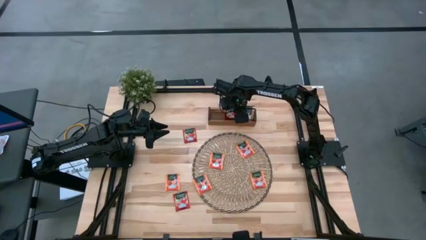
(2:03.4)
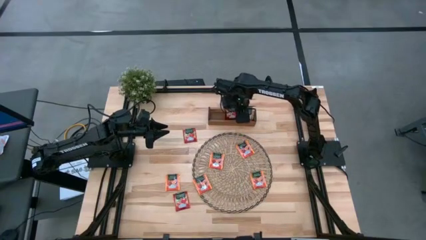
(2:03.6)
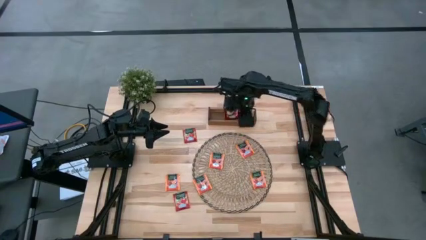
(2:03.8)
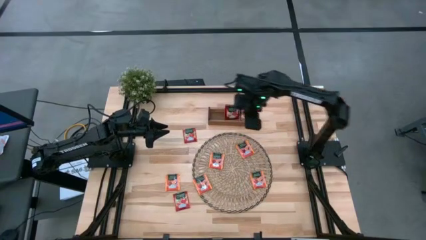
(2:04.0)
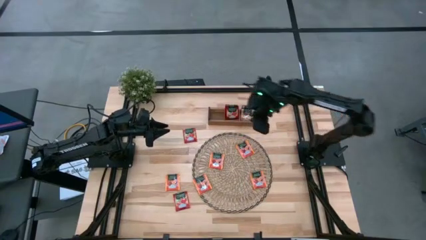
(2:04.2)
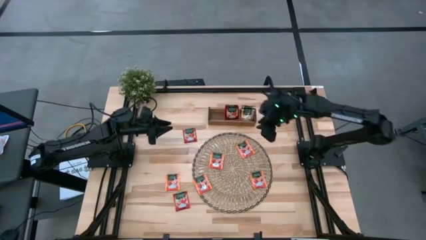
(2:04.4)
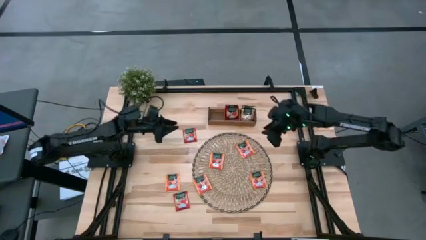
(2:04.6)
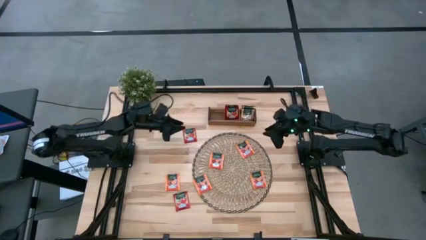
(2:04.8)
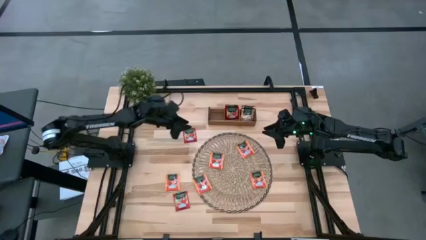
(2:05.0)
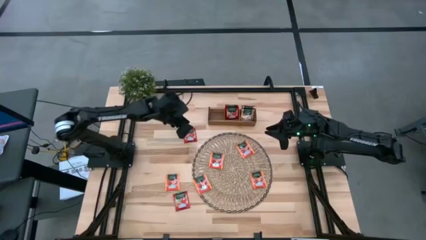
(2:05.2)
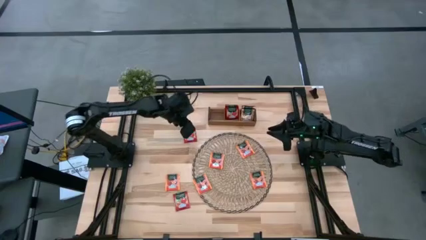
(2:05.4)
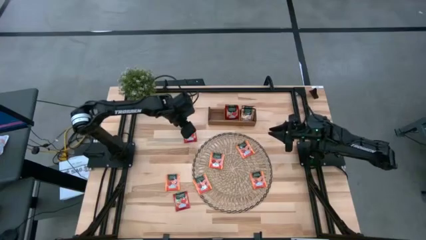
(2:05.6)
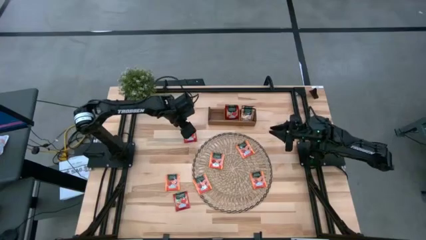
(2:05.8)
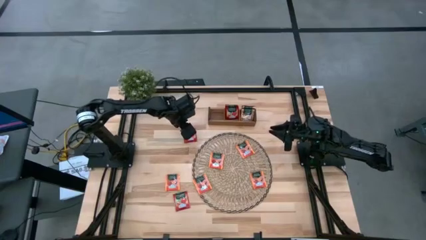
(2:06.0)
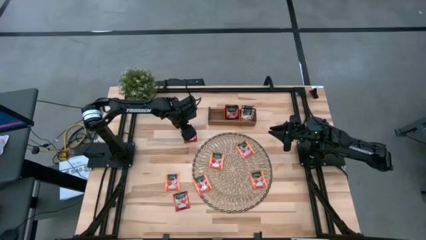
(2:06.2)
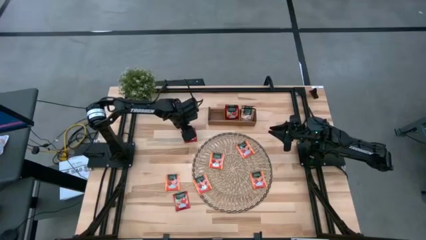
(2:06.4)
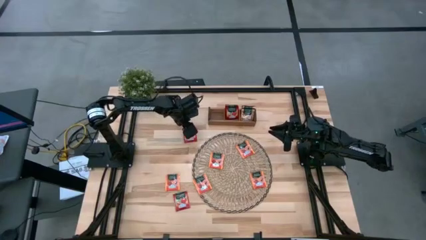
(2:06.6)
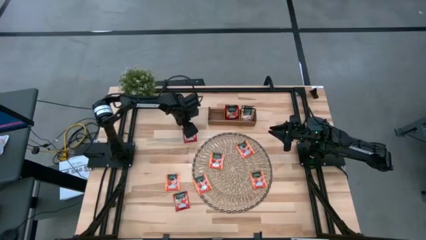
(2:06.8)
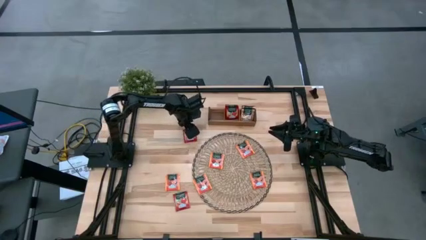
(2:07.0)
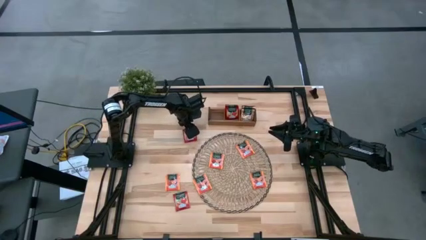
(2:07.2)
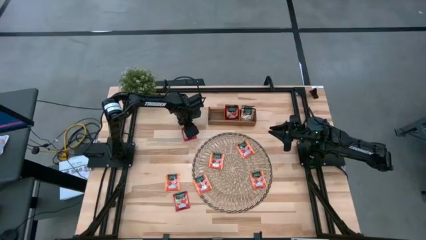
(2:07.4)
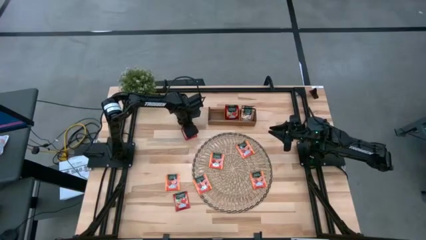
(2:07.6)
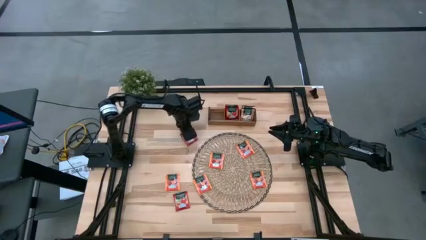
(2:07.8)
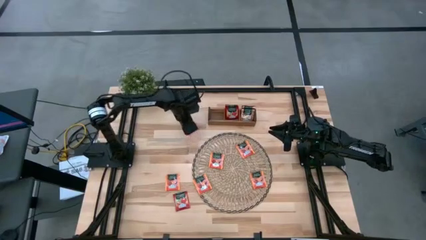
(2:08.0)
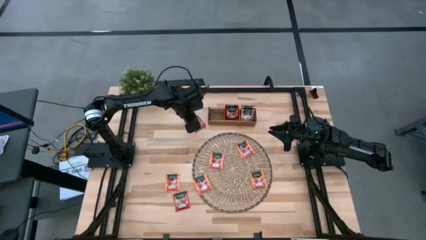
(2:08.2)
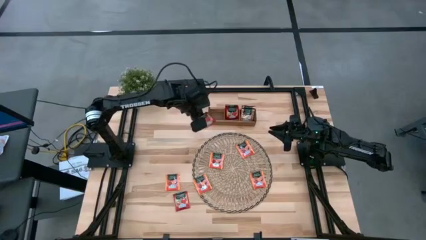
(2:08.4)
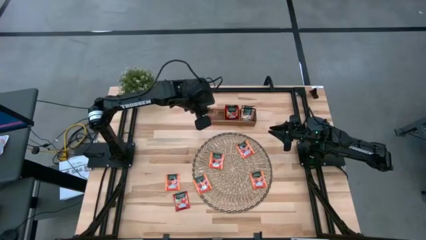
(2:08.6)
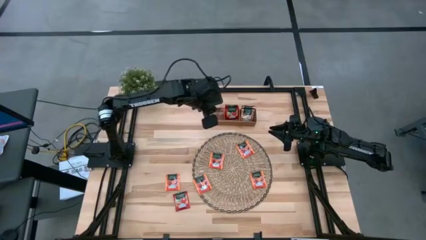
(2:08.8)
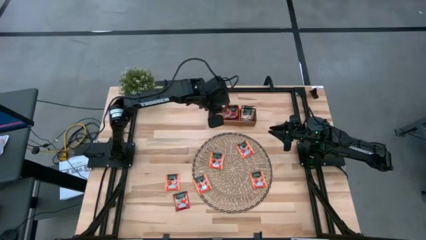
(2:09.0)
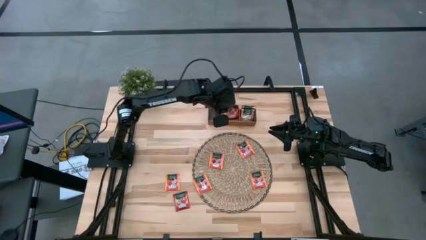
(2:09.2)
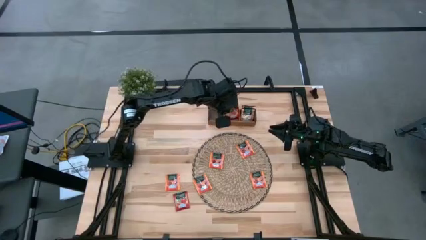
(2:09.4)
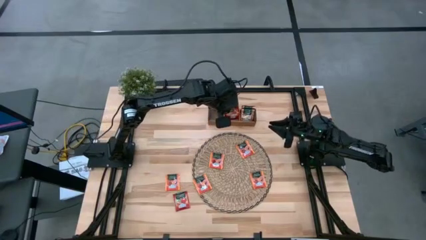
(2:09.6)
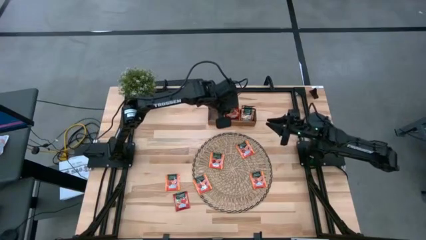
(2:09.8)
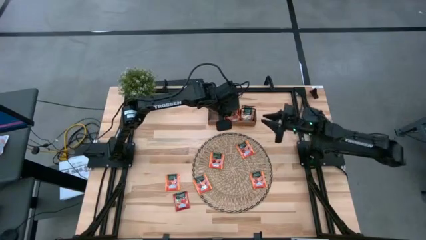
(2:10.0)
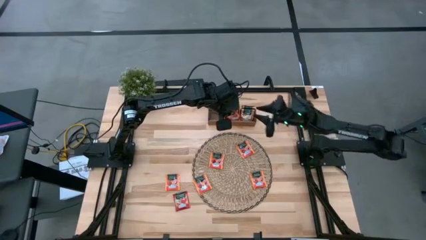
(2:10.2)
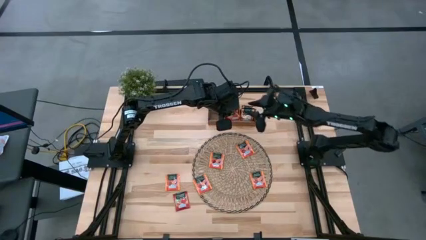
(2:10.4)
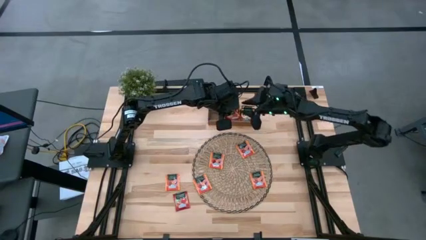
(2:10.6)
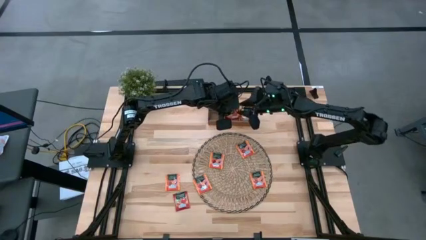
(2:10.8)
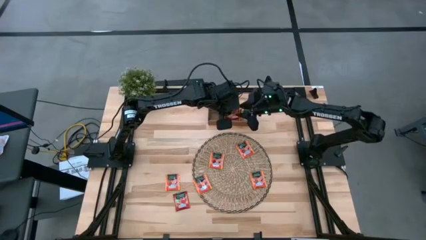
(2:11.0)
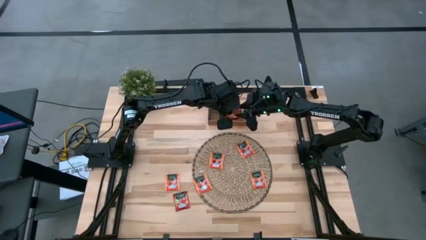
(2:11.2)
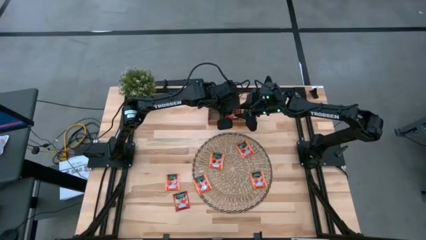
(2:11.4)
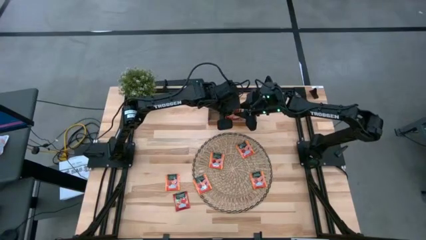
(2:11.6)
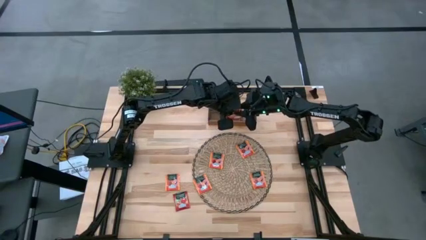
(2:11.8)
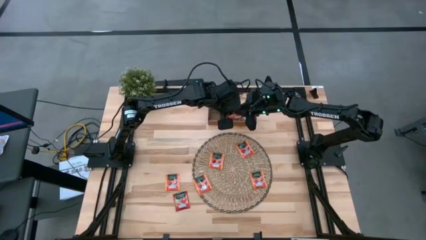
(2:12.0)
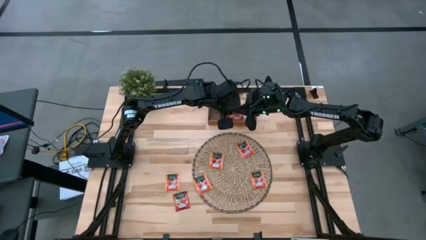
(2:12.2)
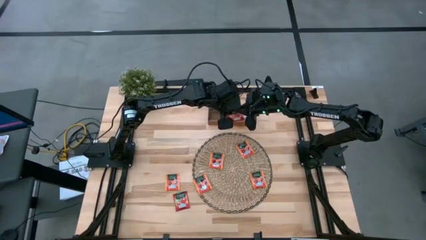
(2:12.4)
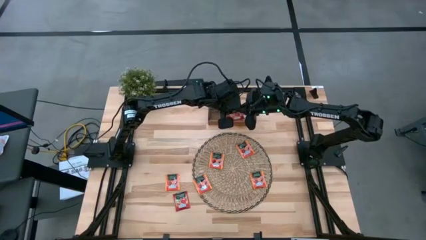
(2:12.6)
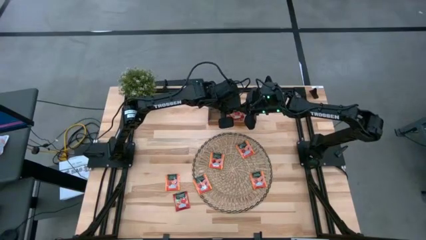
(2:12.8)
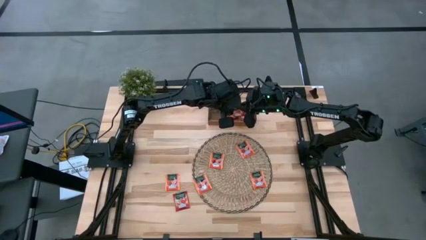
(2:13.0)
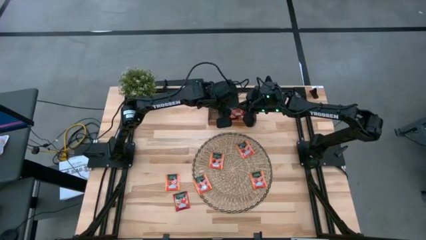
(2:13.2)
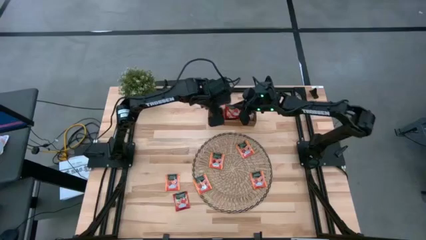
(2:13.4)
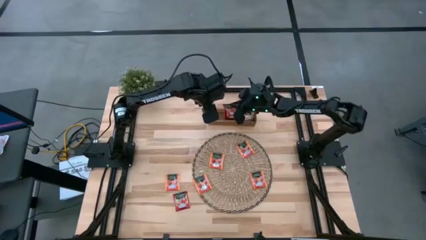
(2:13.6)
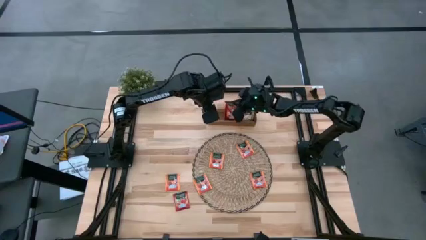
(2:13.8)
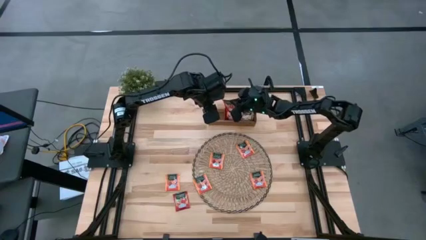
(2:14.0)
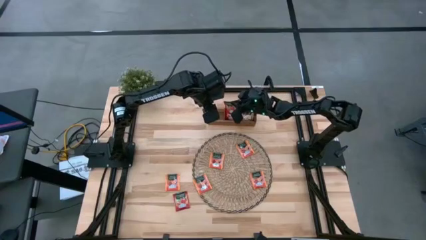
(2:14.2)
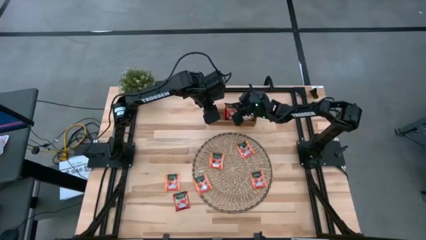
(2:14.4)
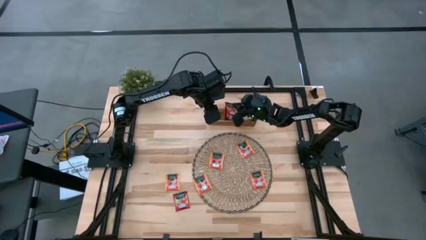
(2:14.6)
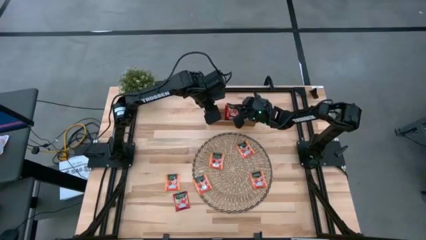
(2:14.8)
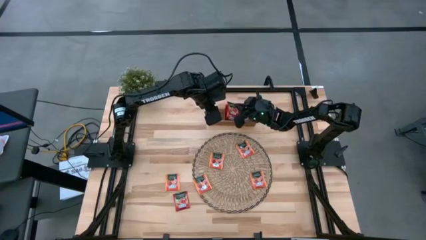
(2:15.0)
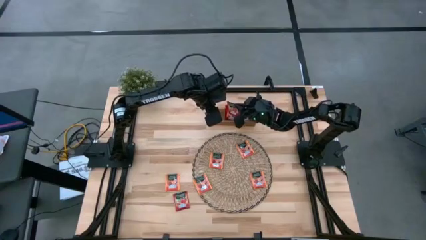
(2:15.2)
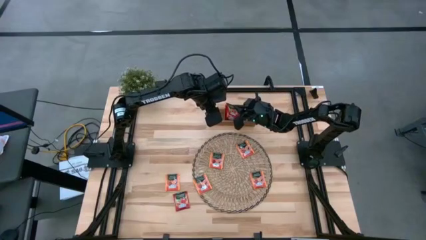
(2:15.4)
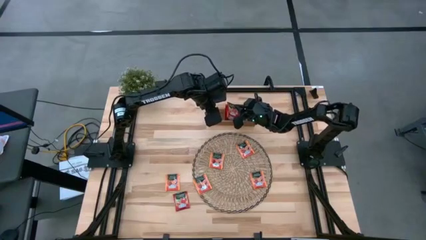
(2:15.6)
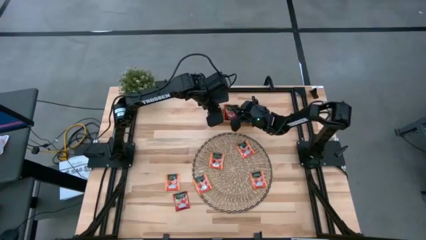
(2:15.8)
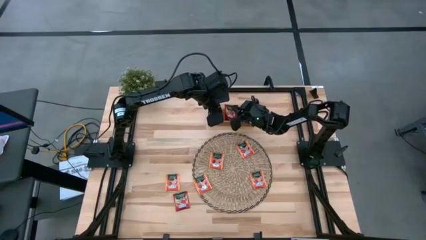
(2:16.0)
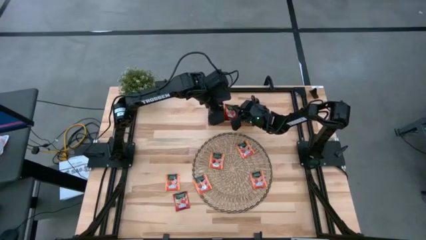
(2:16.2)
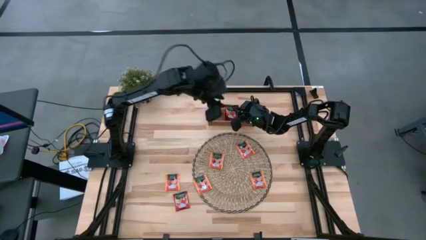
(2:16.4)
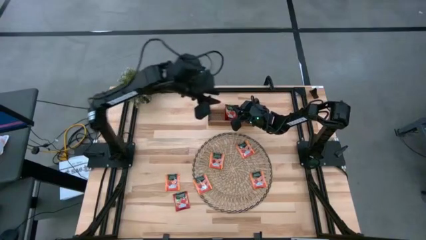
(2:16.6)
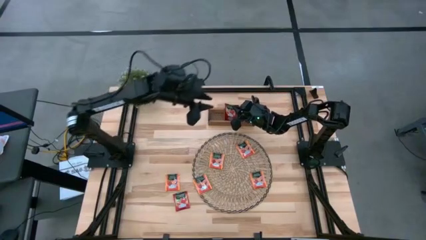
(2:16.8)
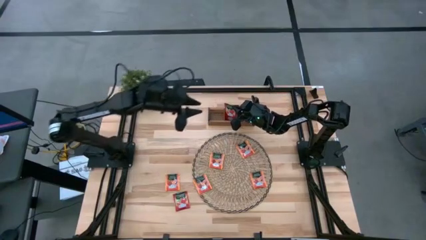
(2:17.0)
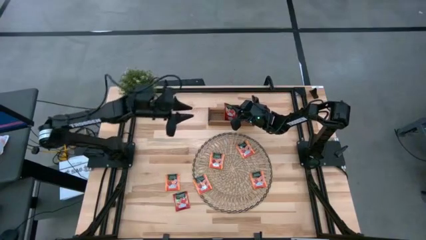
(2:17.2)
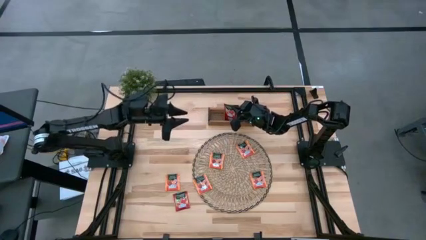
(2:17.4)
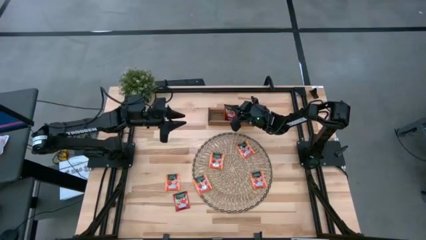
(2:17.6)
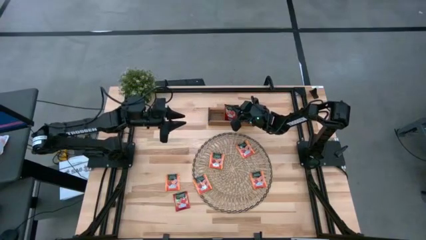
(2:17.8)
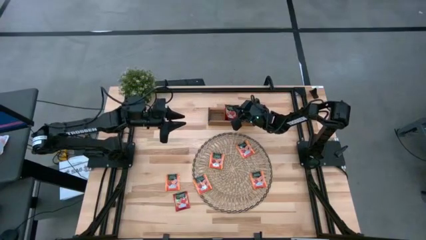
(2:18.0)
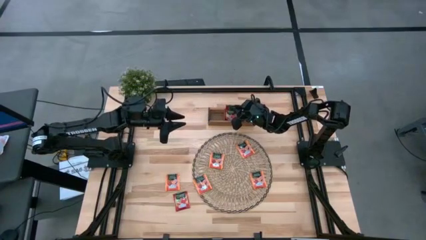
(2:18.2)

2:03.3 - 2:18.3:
Task: Pick & Place Tea
Put the top red tea bag into the middle section of the wooden organizer
